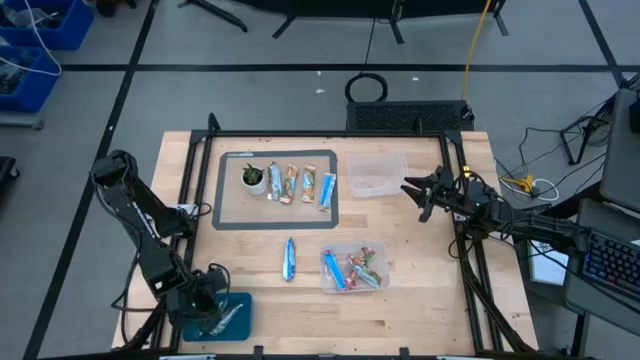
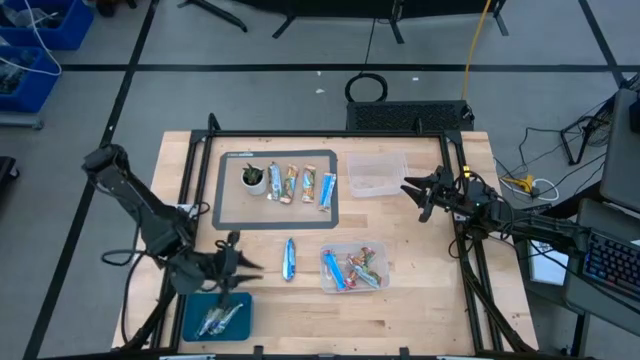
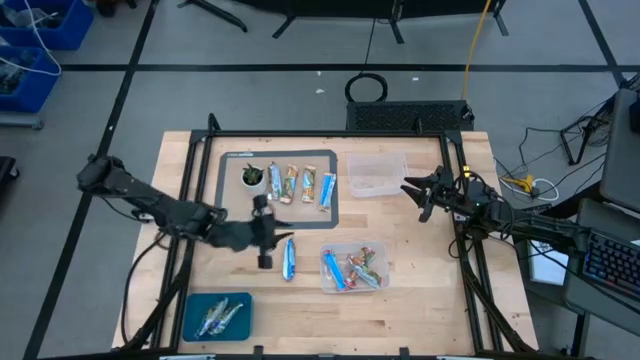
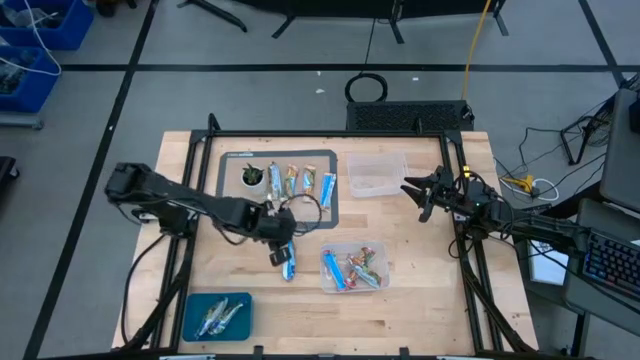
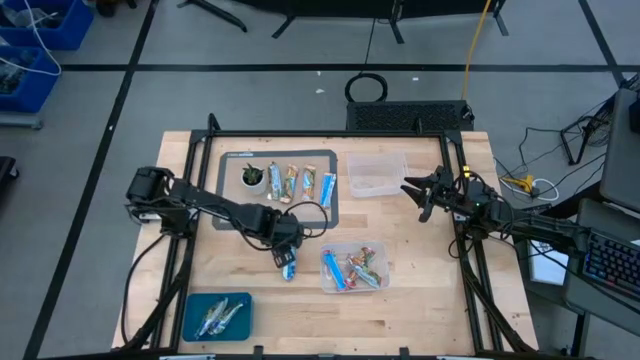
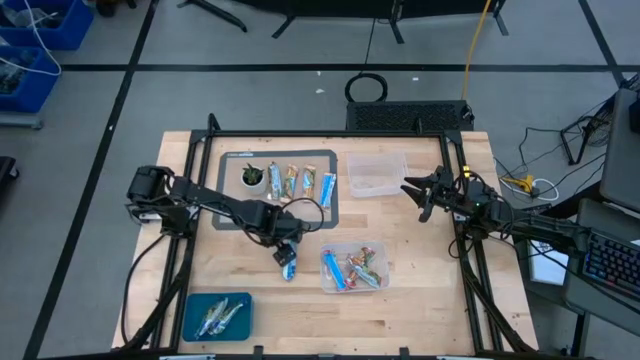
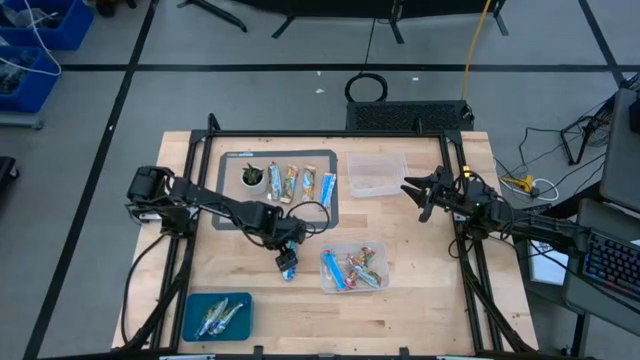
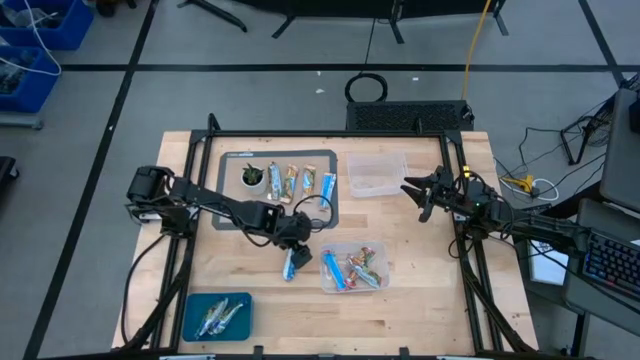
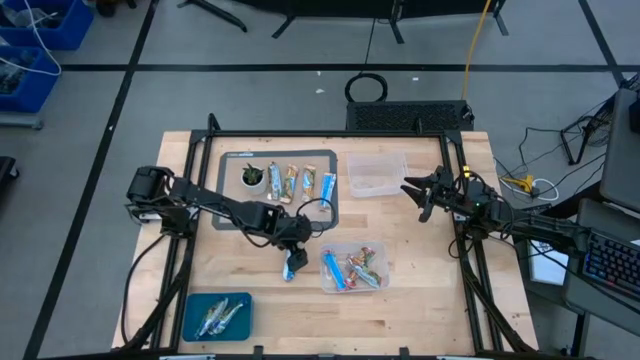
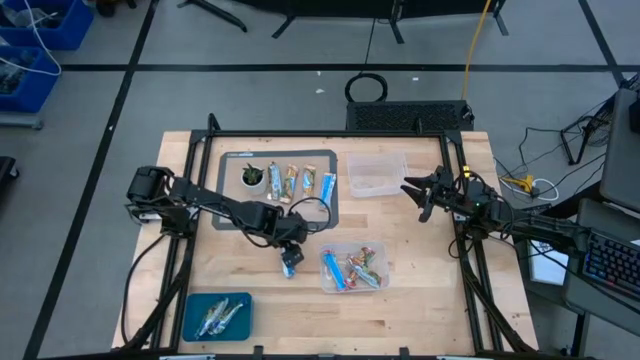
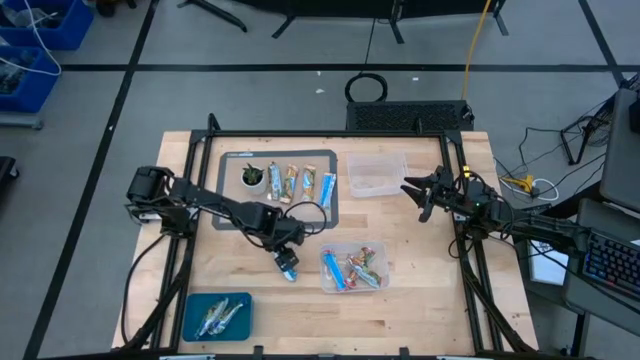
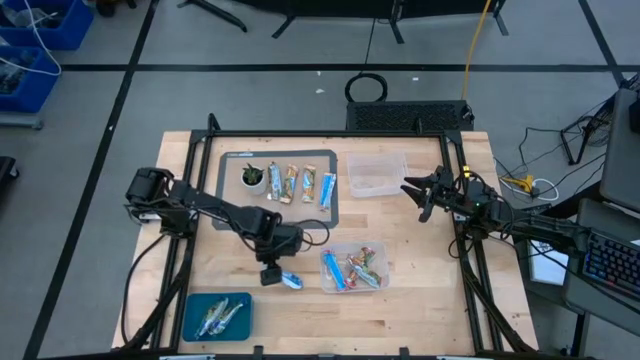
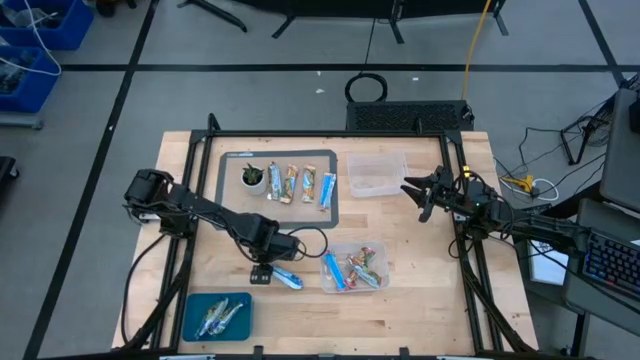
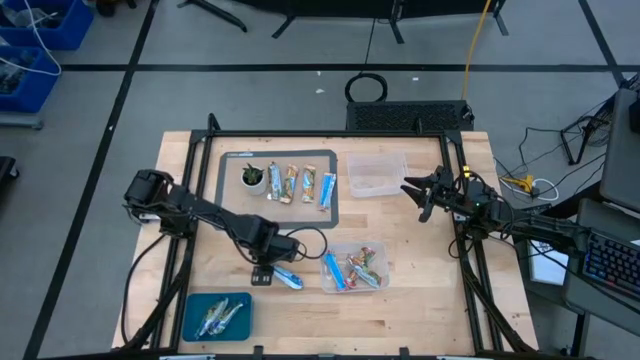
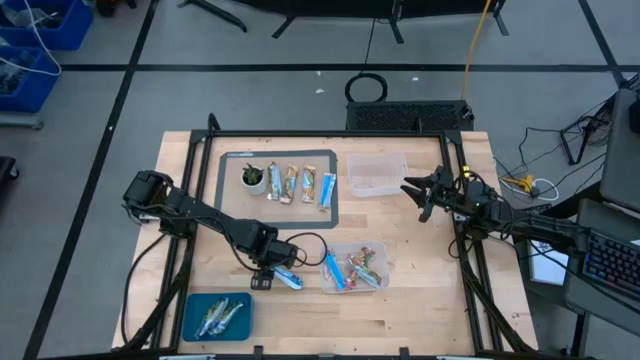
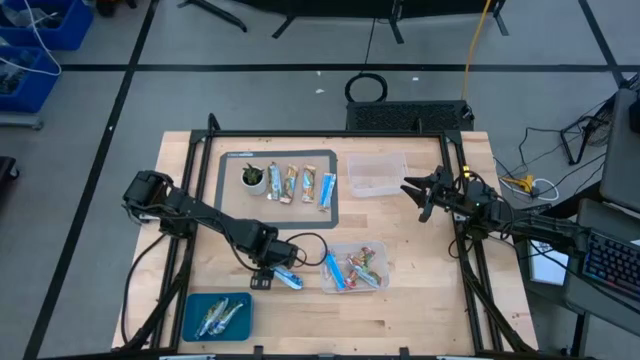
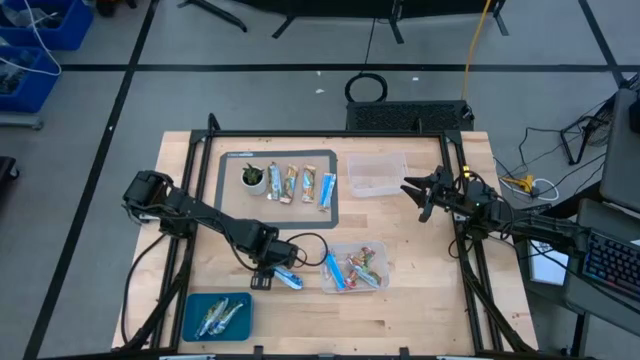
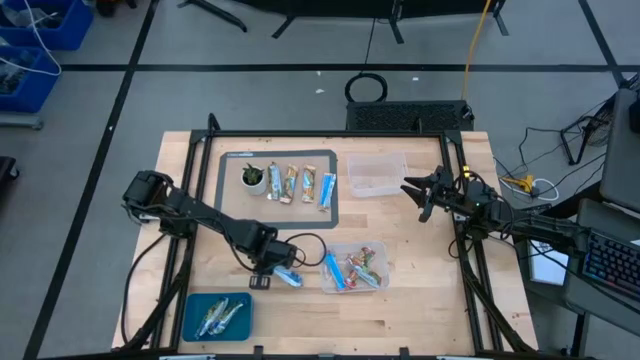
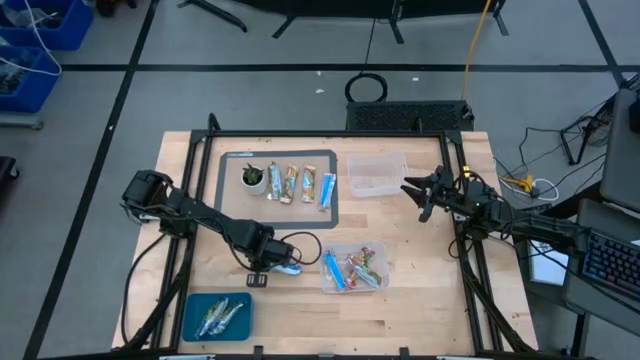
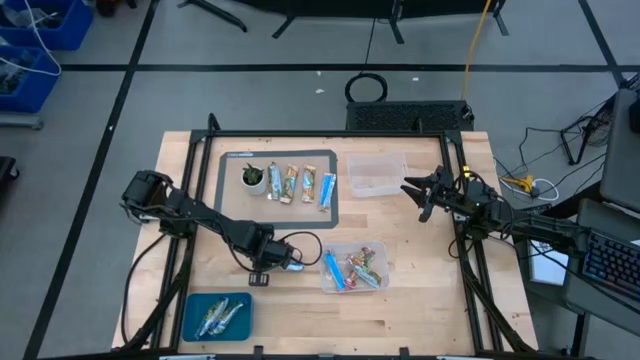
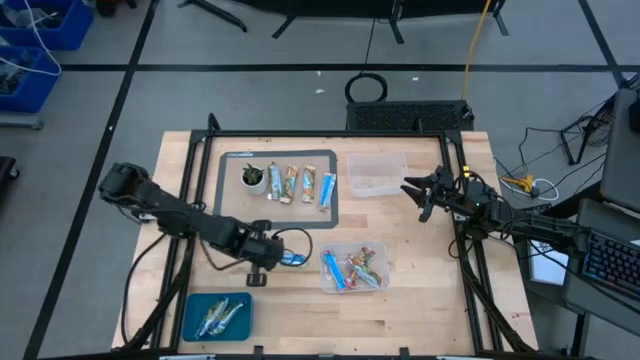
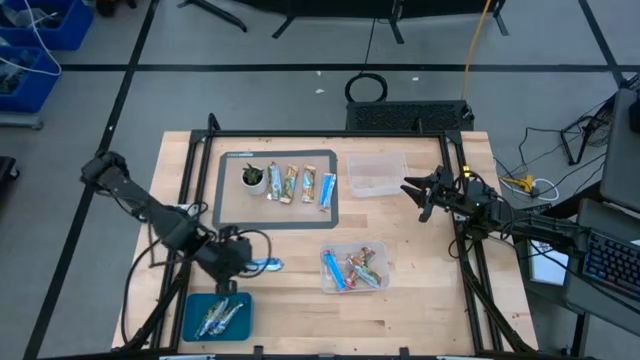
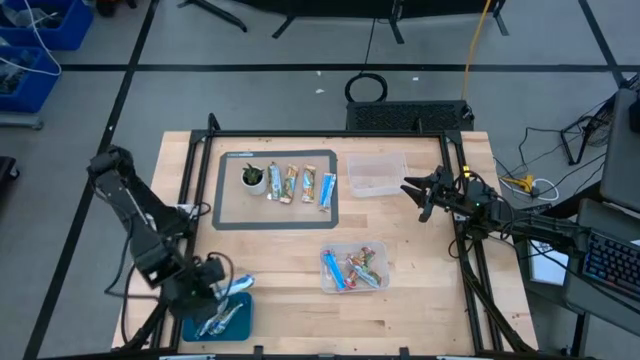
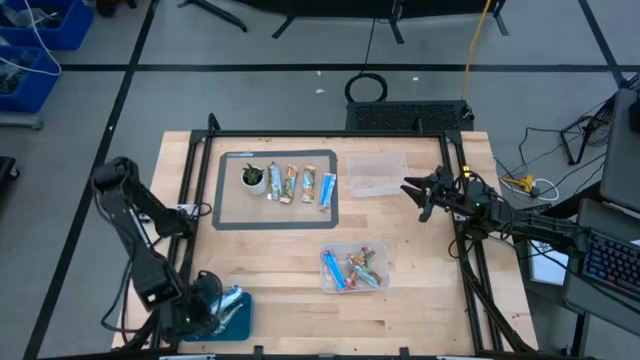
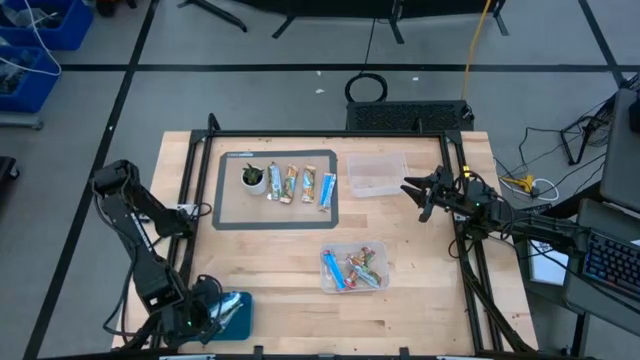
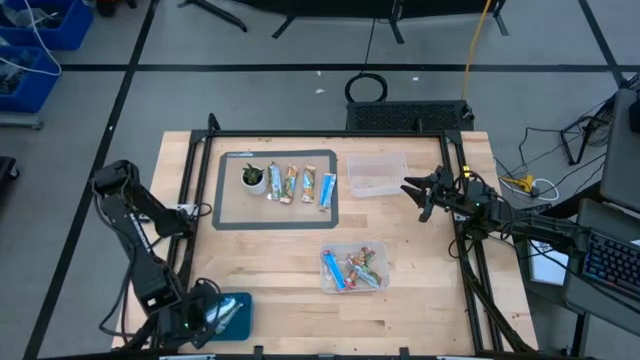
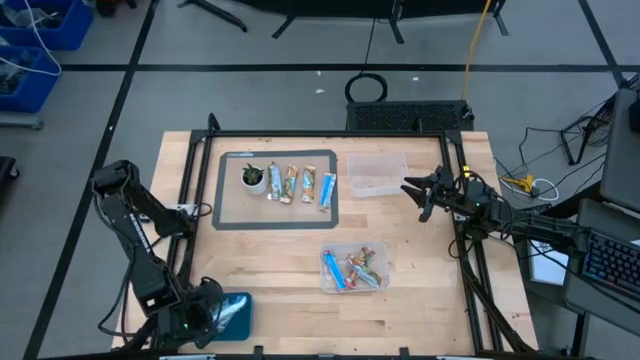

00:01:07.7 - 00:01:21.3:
Task: Pick and place Granola Bars by type
Put the blue granola bar into the blue bin

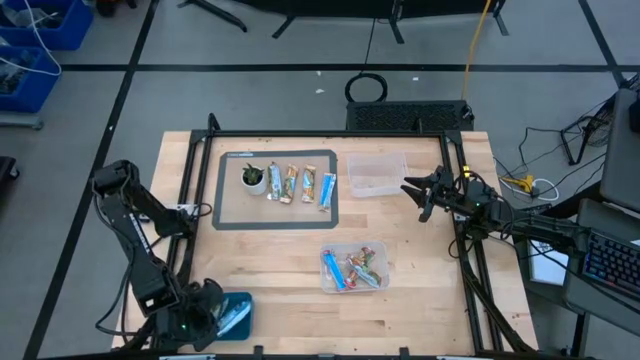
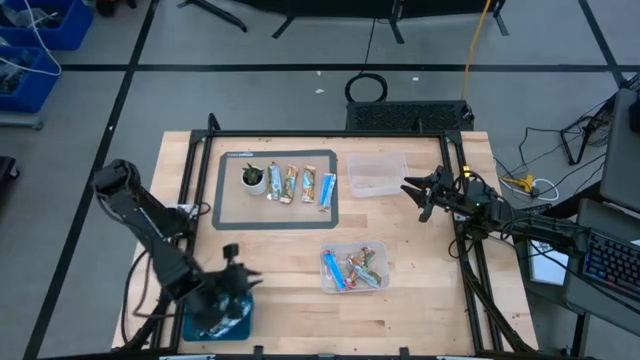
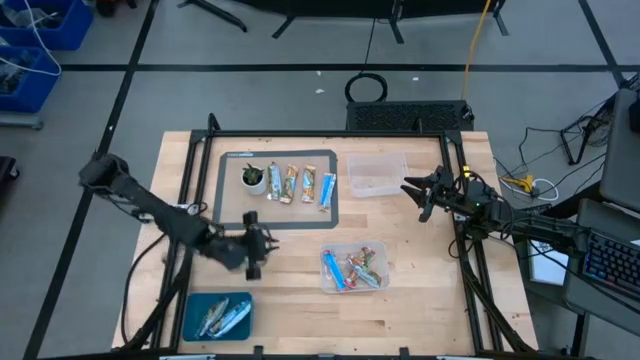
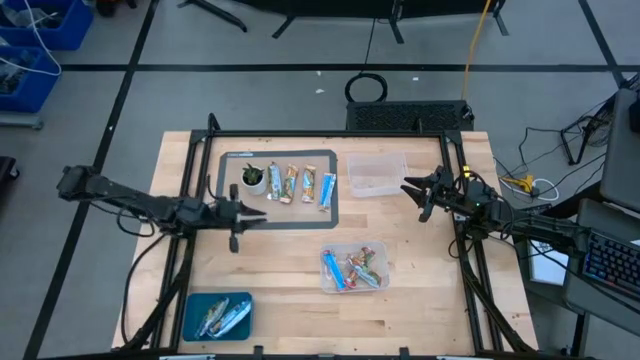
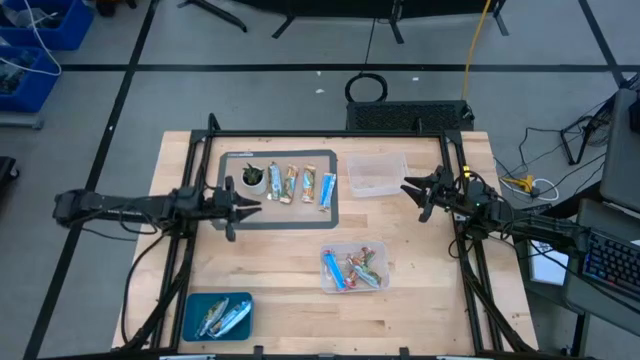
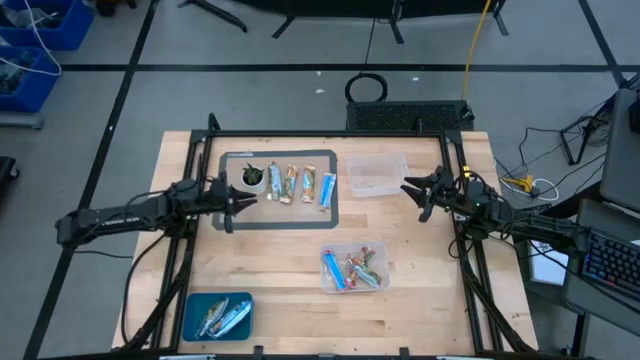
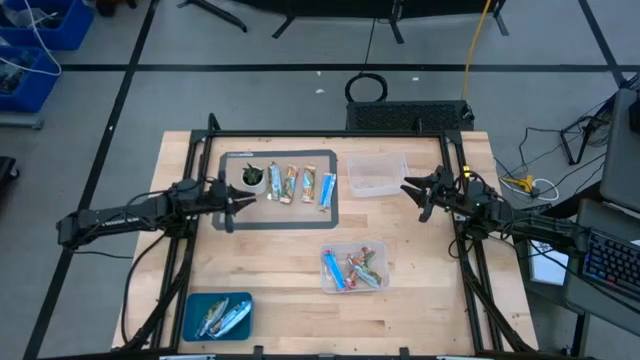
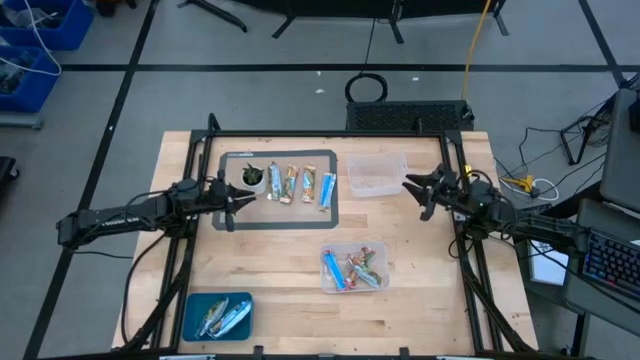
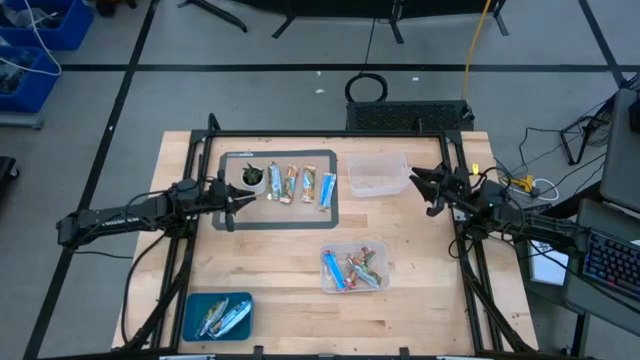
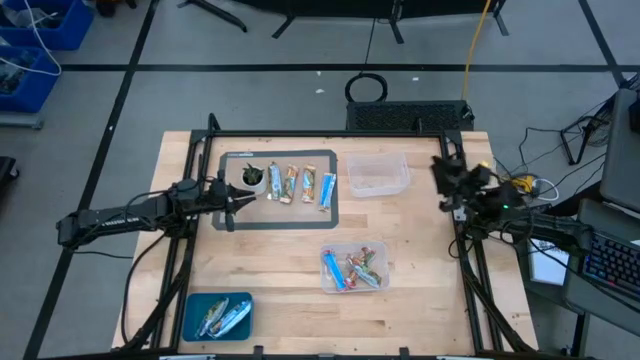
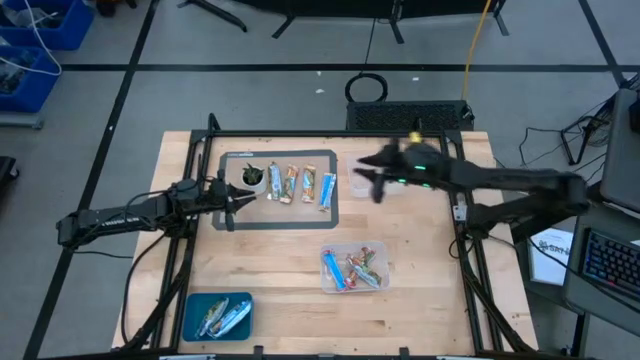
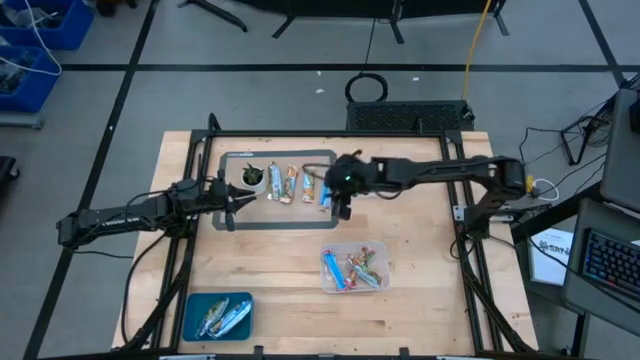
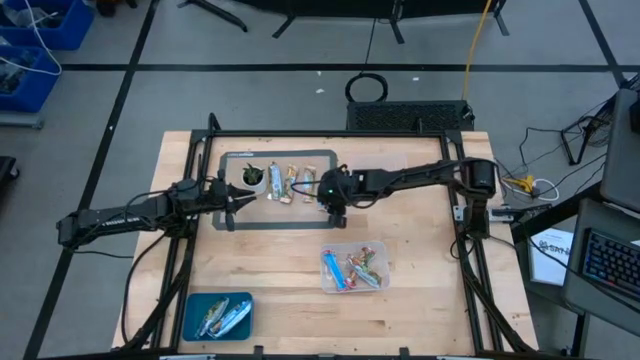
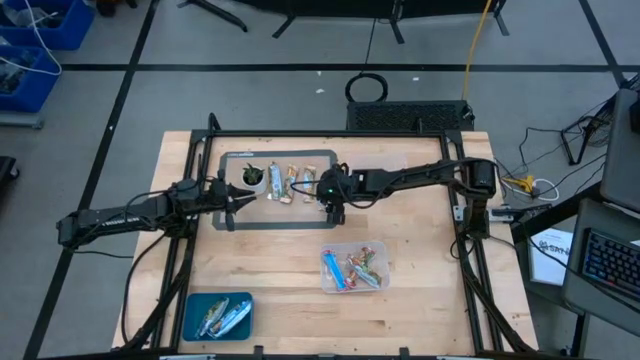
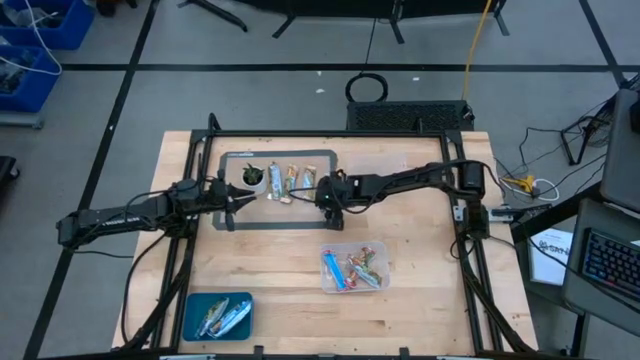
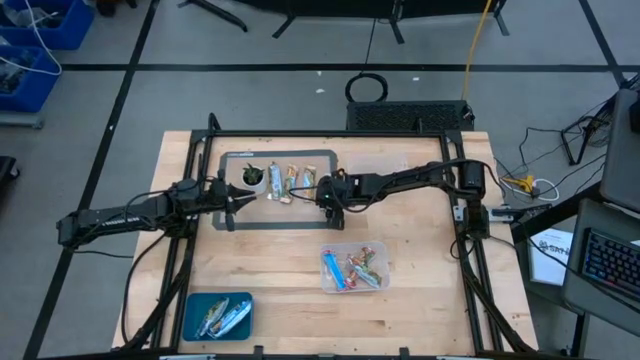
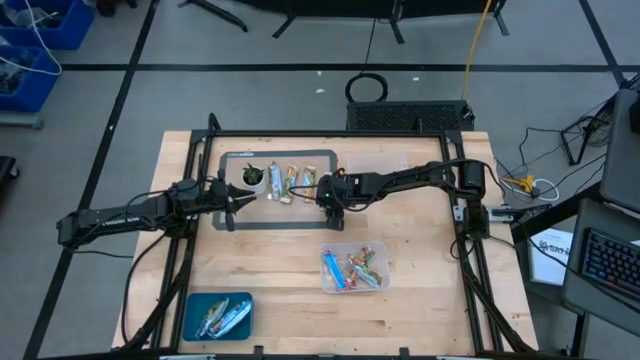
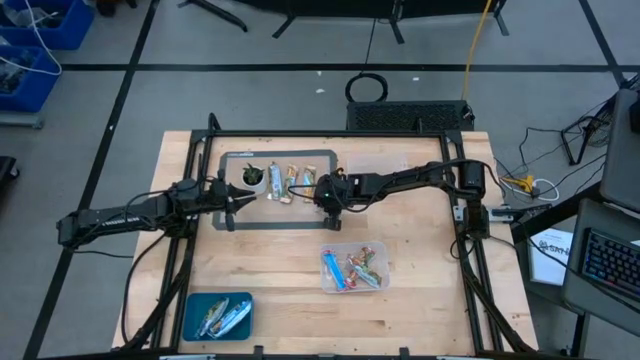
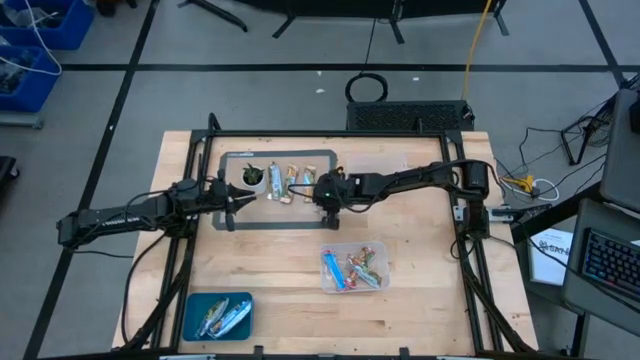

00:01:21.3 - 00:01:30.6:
Put the yellow granola bar into the top transparent bin
